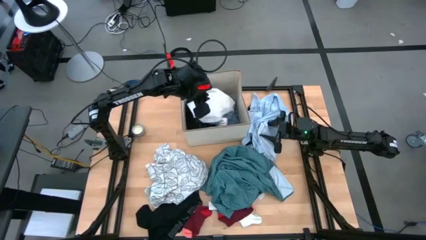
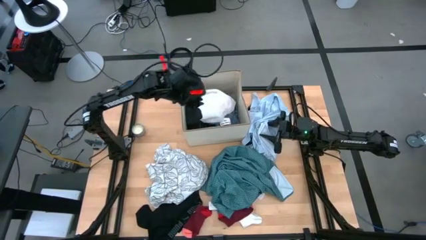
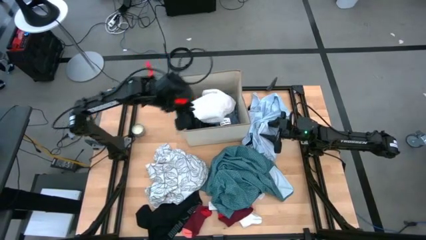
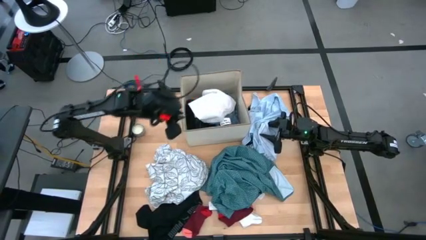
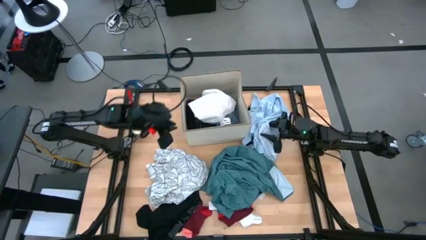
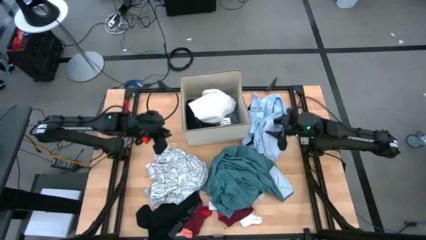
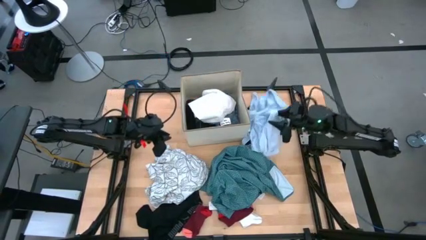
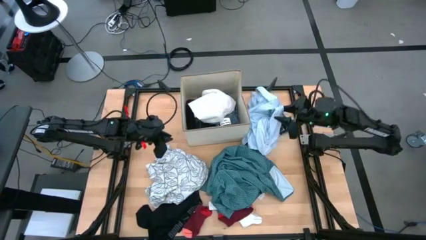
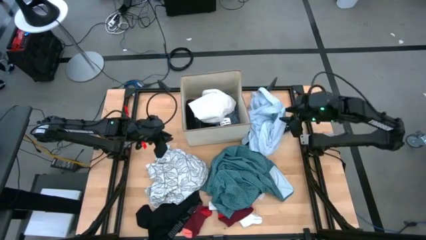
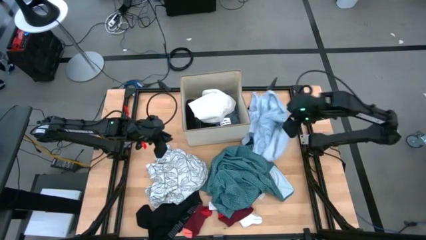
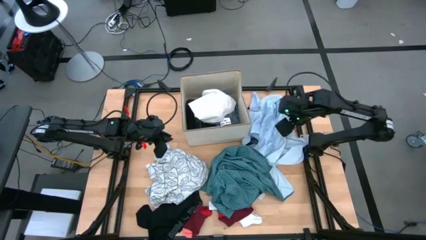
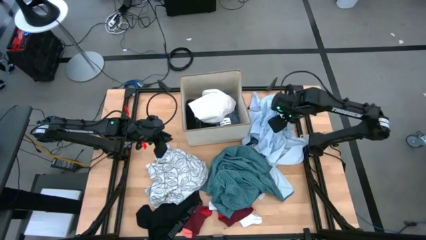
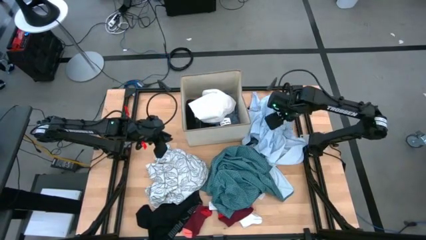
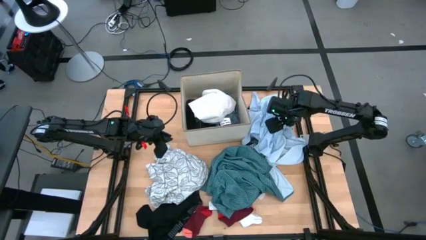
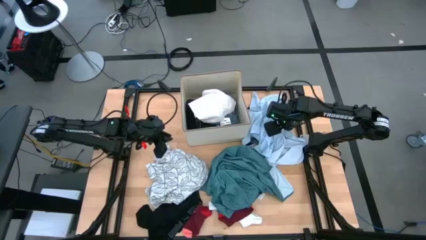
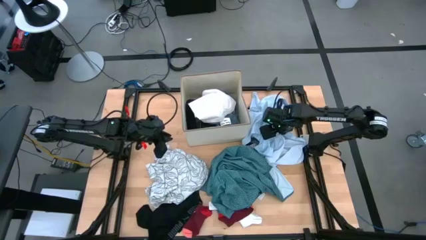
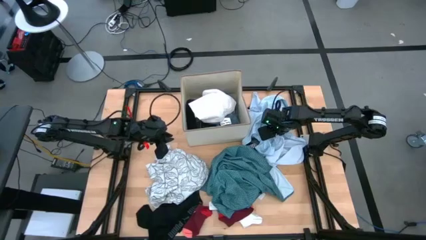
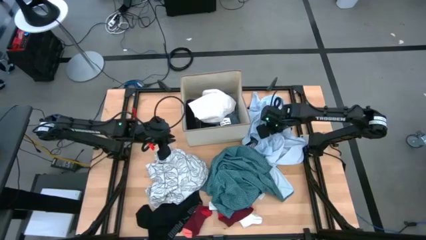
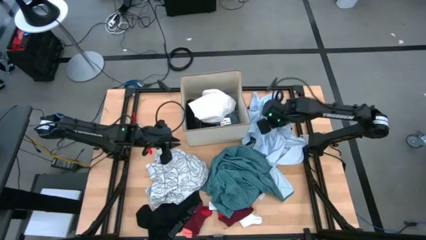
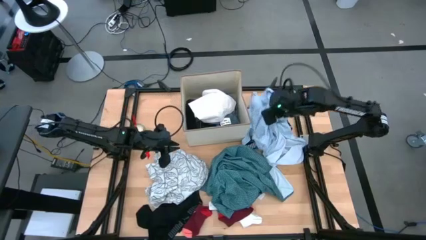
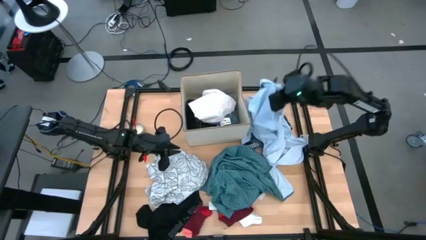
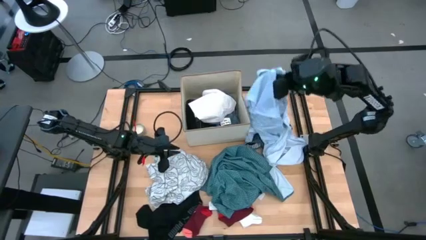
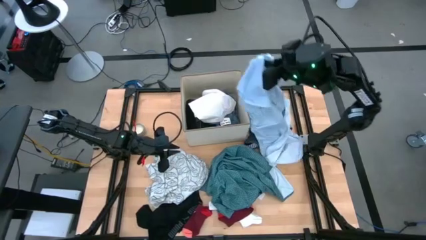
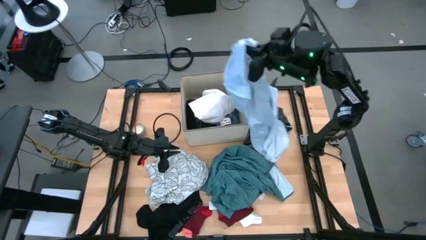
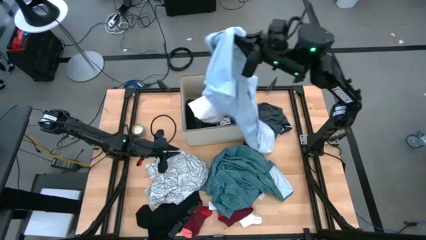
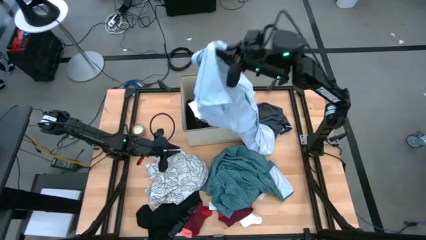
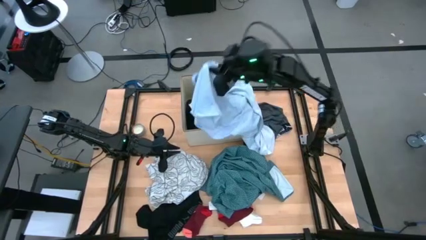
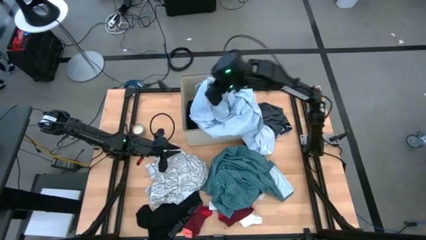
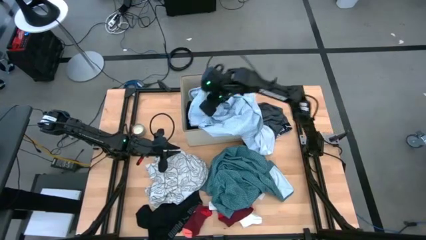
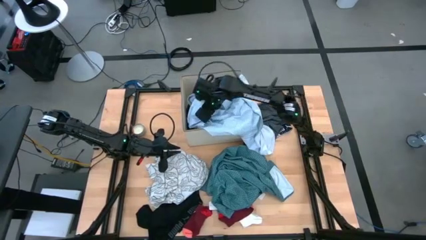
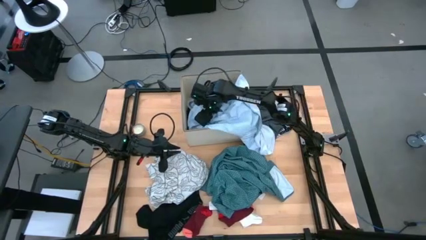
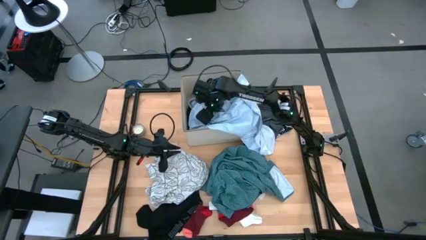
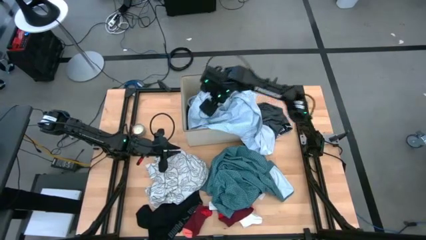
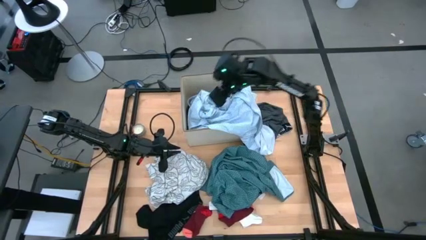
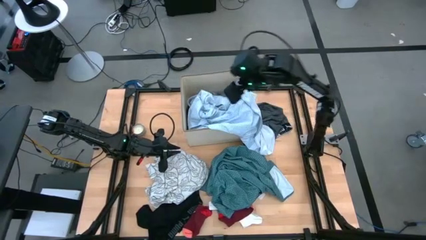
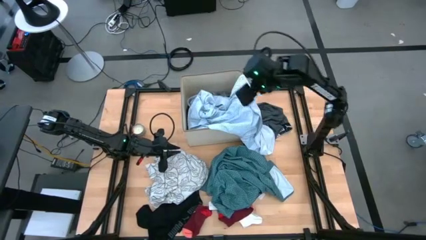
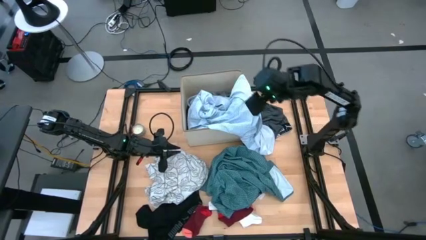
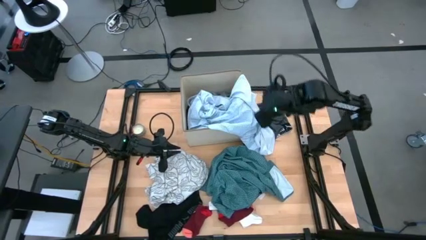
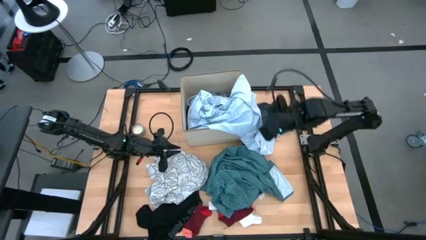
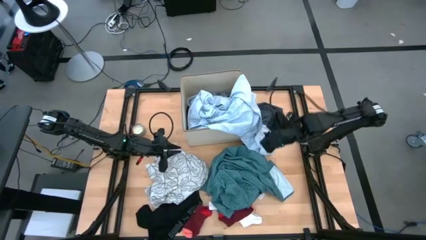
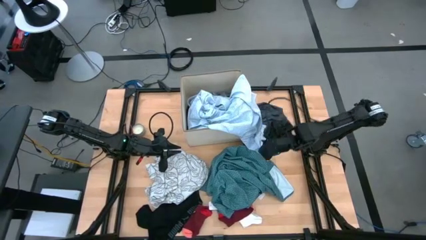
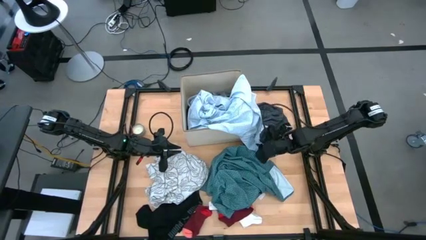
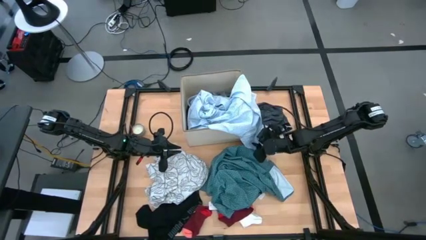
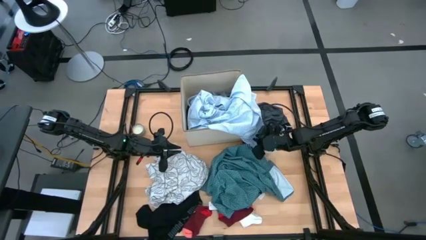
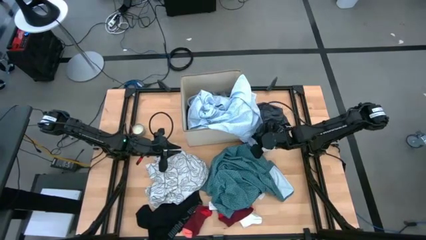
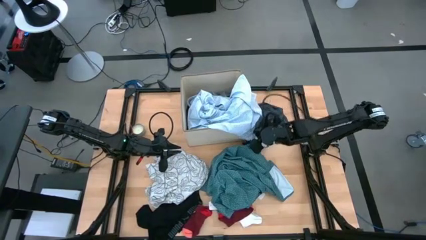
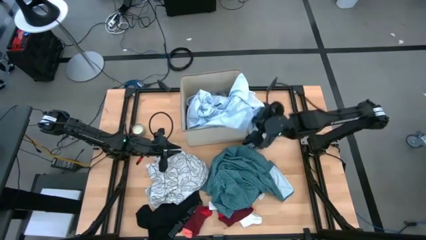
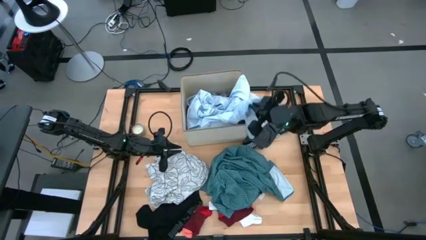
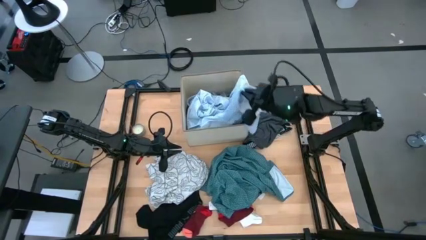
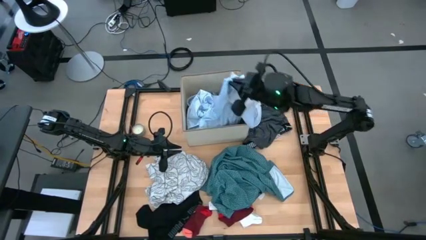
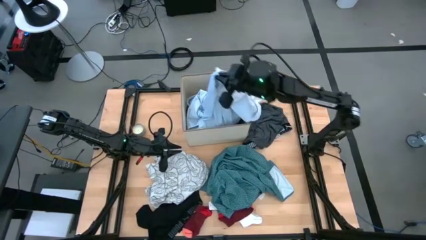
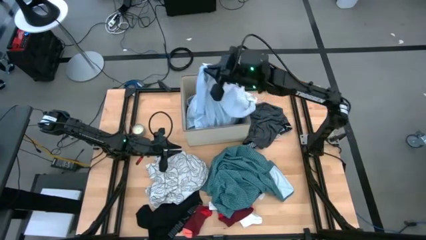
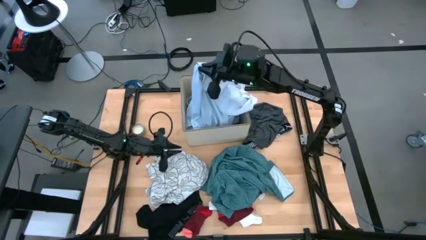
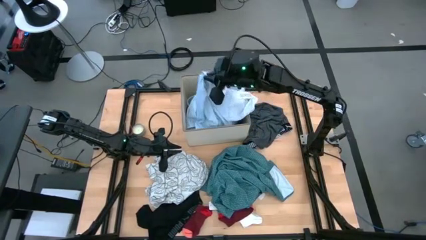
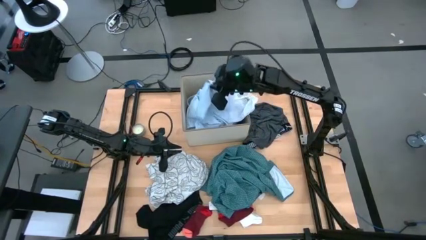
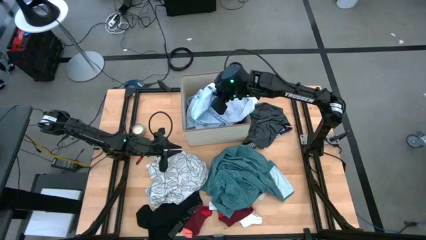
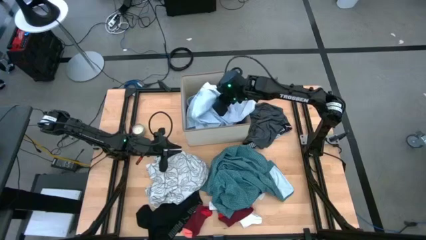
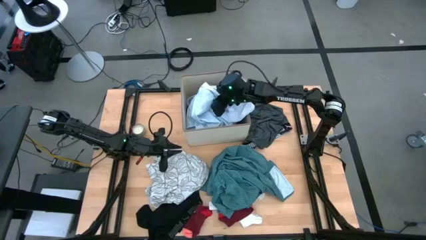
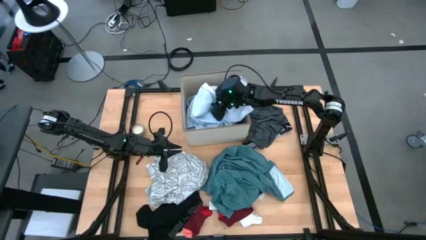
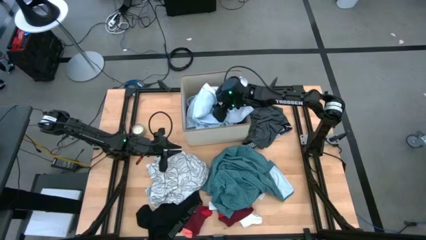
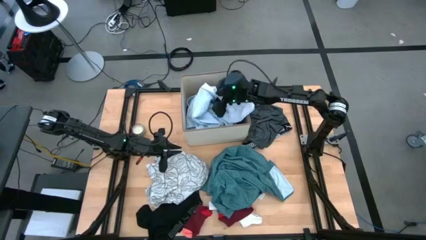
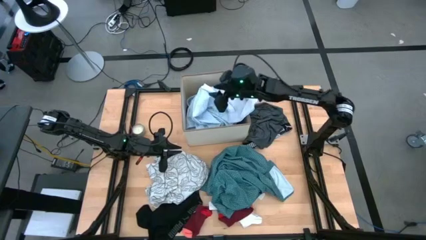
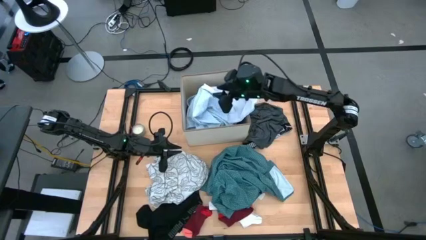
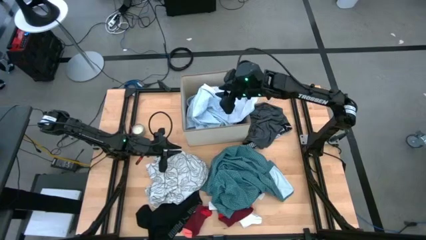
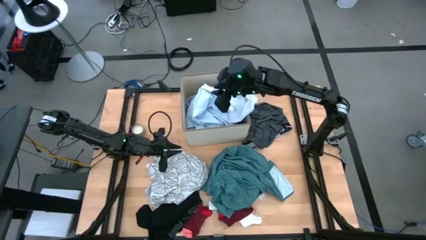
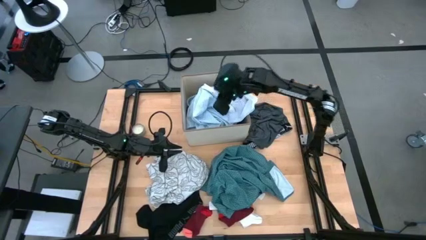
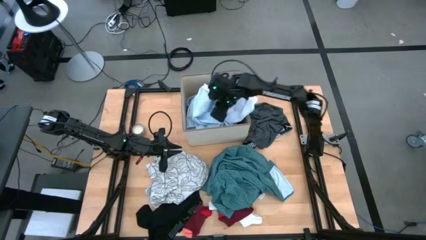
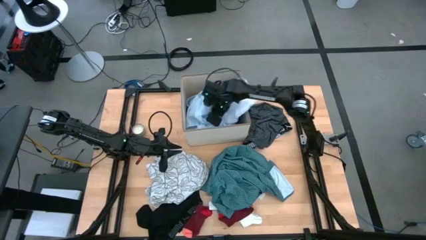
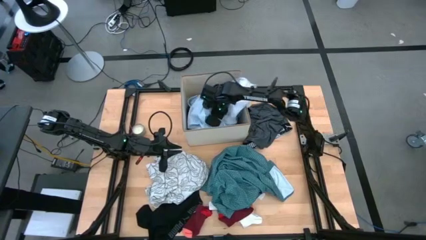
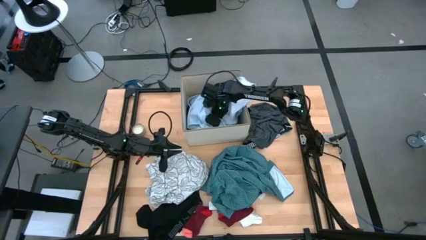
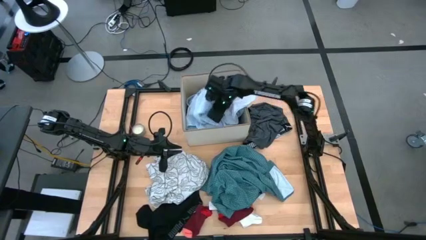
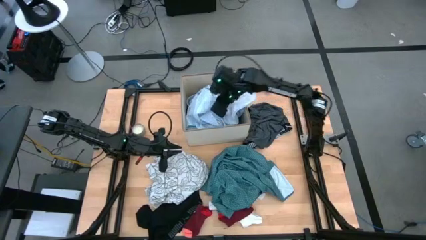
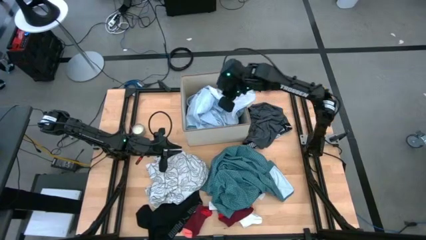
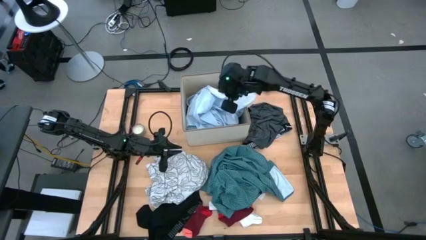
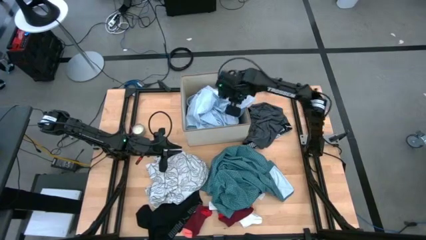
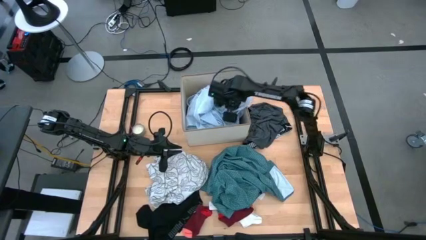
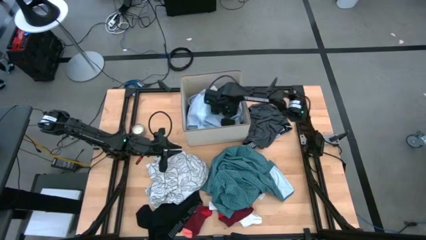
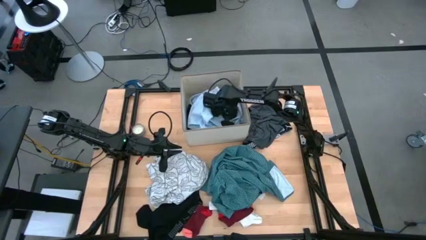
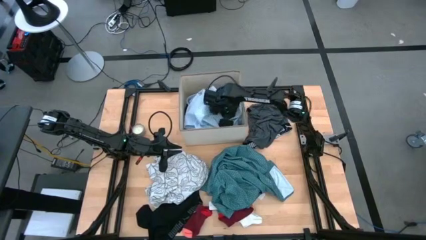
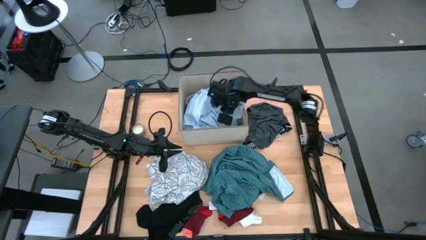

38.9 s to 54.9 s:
Task: Sort clothes
Put the blue shirt into the laundry organizer
